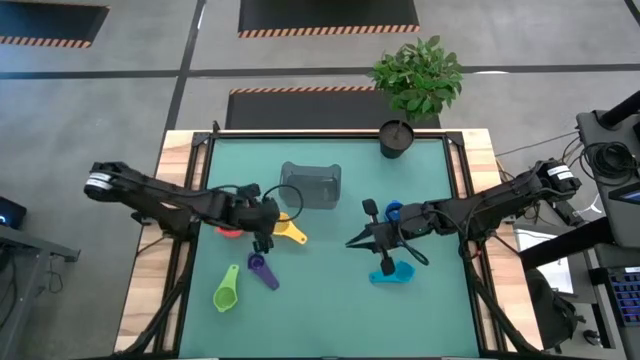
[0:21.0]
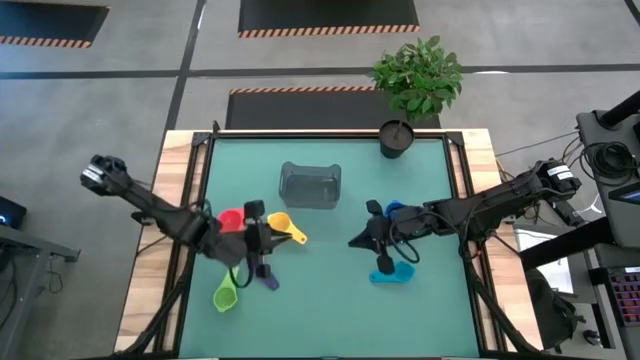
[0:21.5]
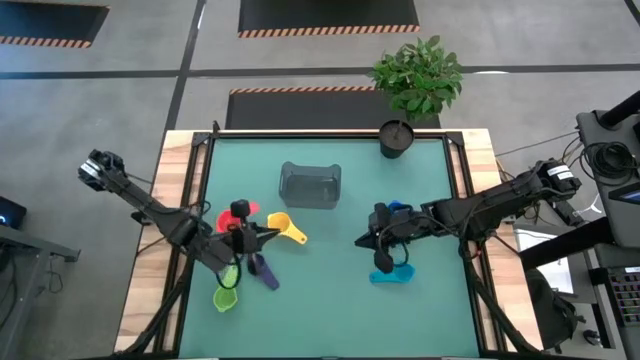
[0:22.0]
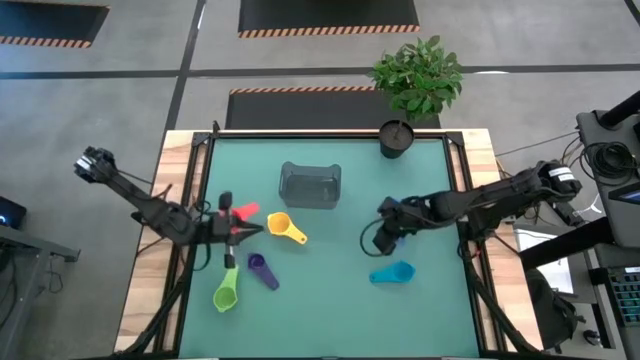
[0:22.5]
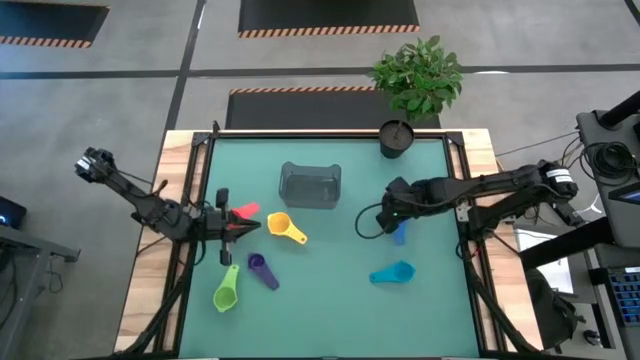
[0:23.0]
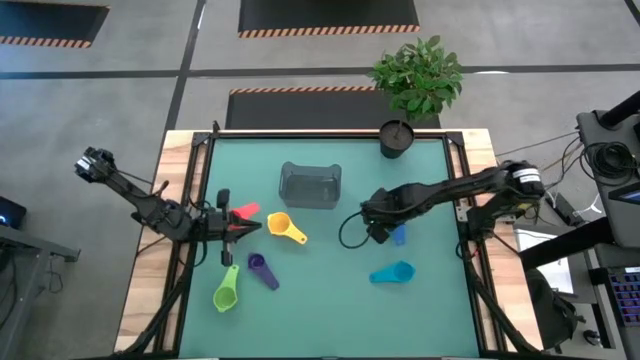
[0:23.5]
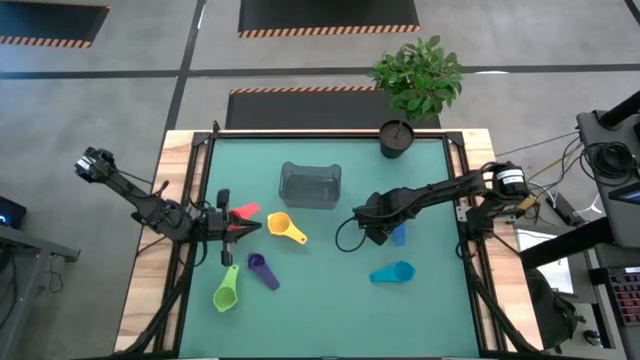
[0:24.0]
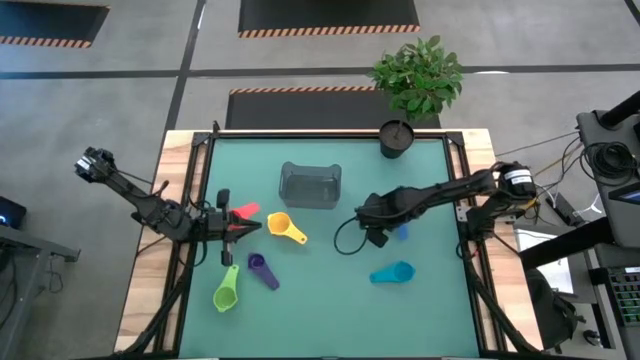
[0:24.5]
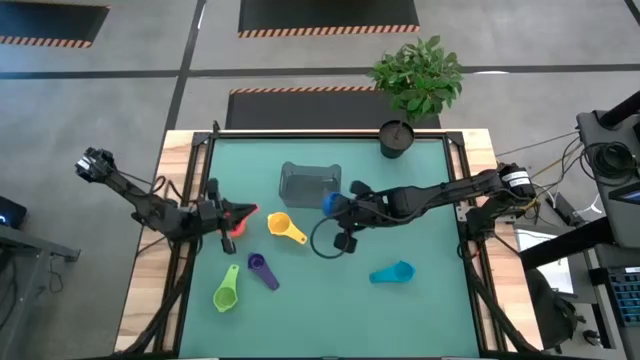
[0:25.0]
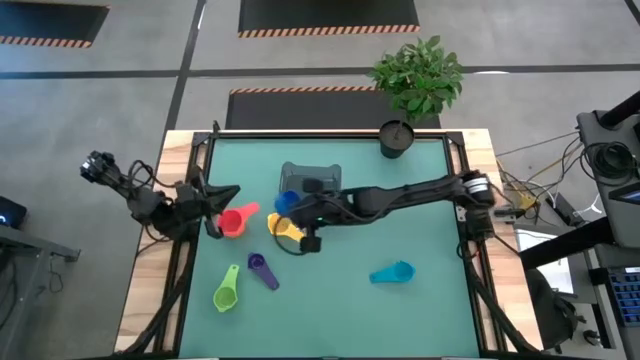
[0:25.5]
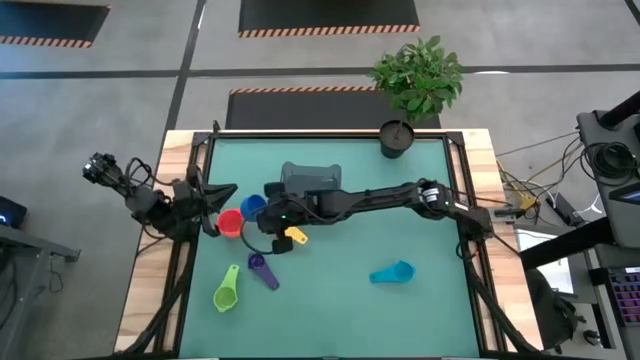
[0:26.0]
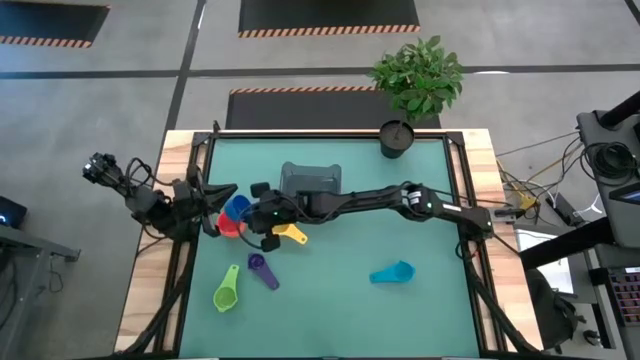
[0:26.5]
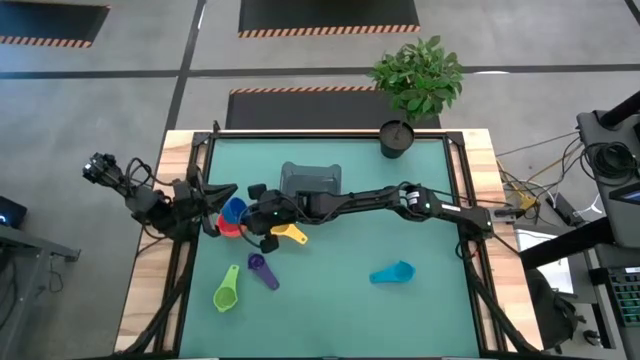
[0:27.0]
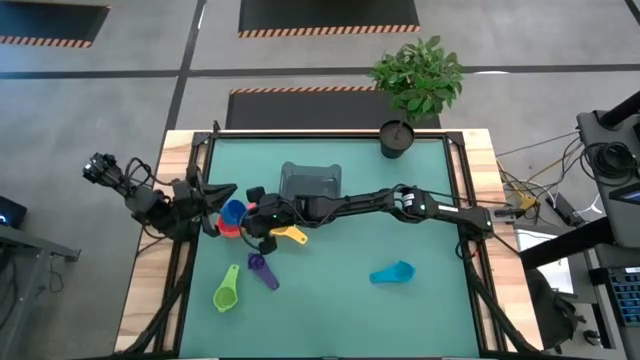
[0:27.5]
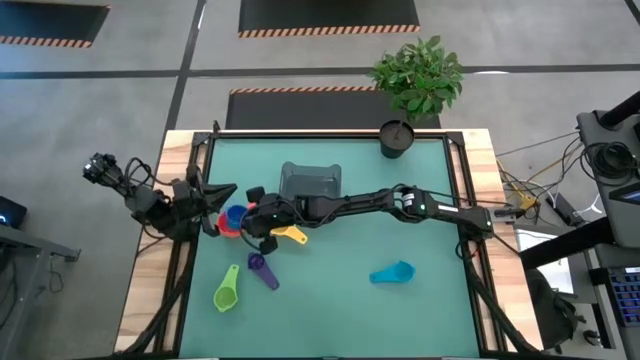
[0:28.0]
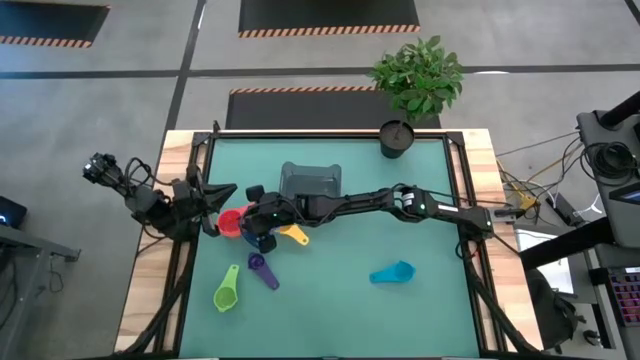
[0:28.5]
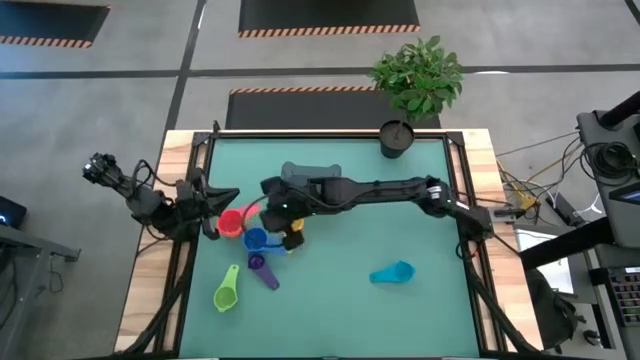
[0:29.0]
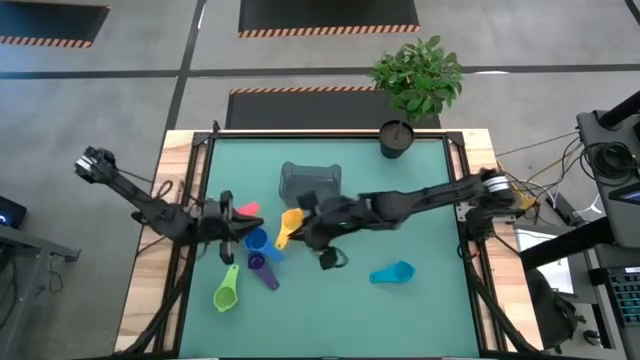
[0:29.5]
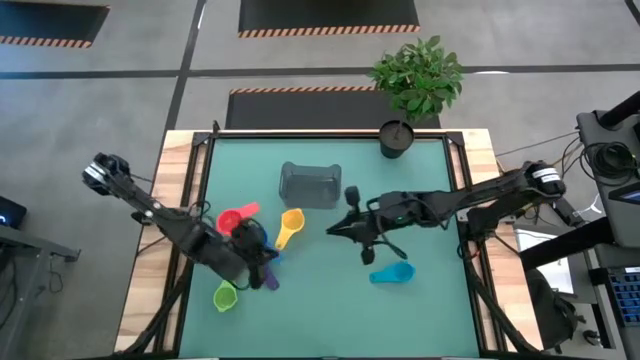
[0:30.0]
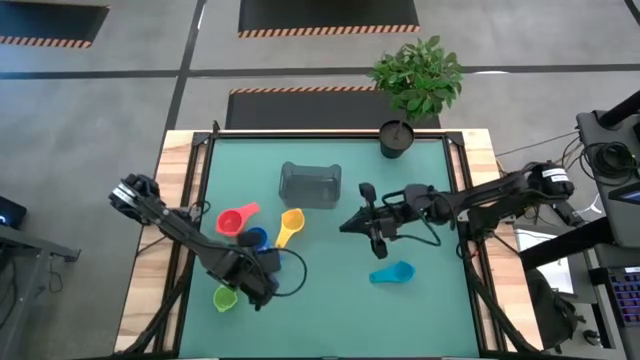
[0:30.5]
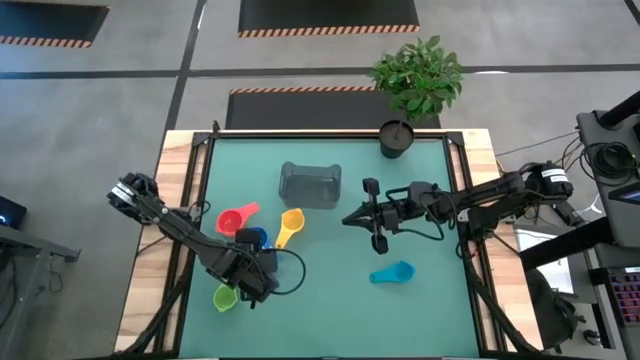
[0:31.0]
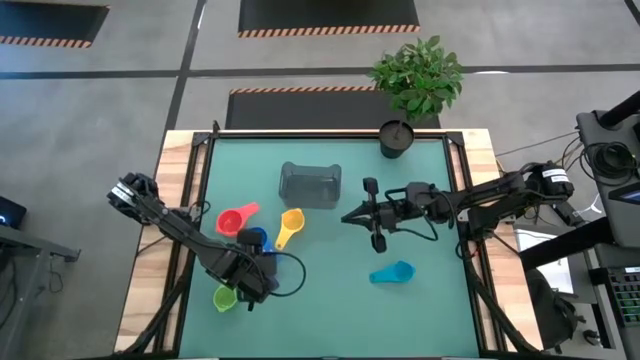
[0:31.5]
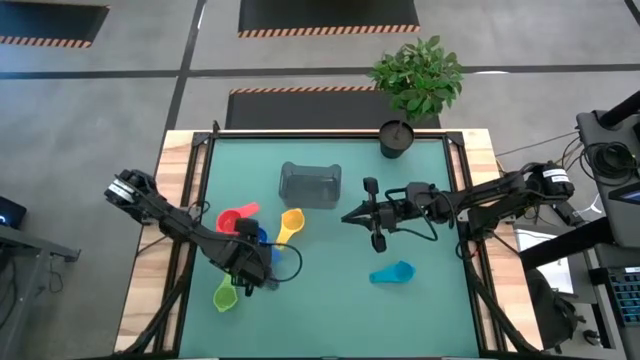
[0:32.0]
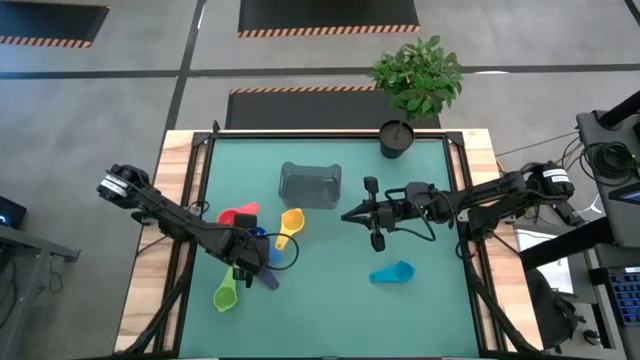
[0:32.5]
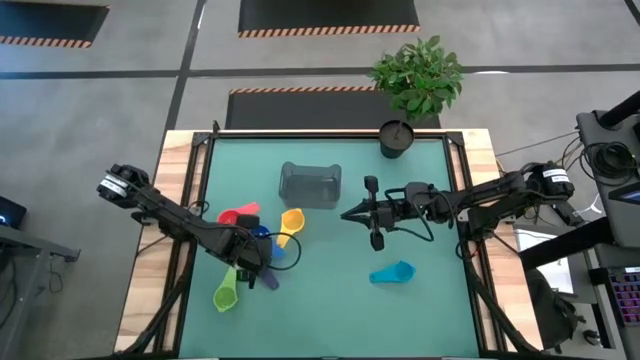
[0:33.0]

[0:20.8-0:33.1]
Task: Nest measuring cups in basket
Stack the blue measuring cup into the red measuring cup

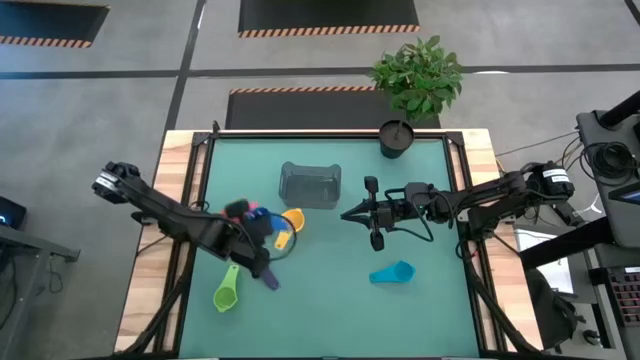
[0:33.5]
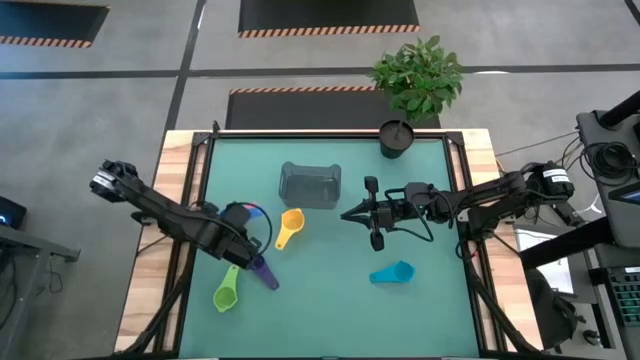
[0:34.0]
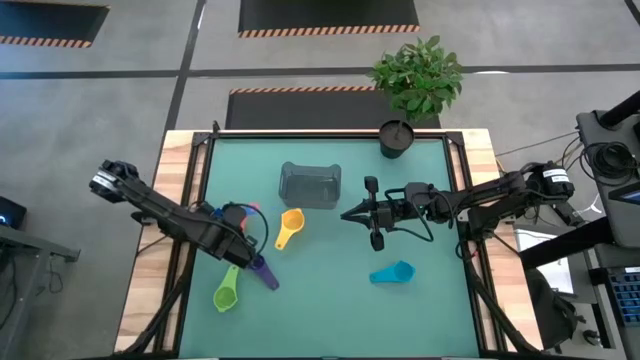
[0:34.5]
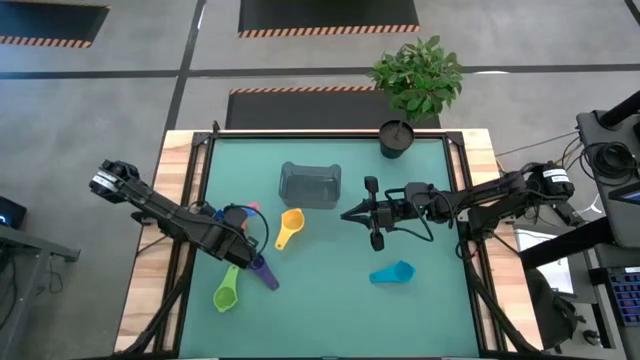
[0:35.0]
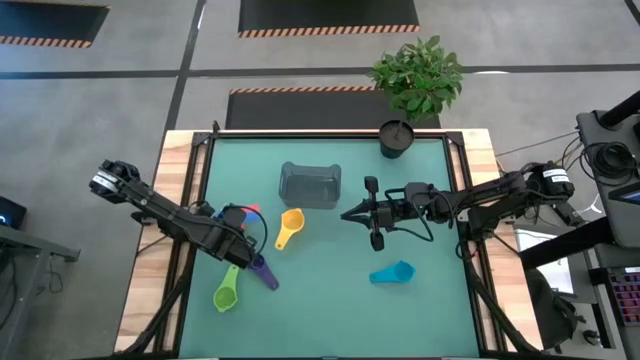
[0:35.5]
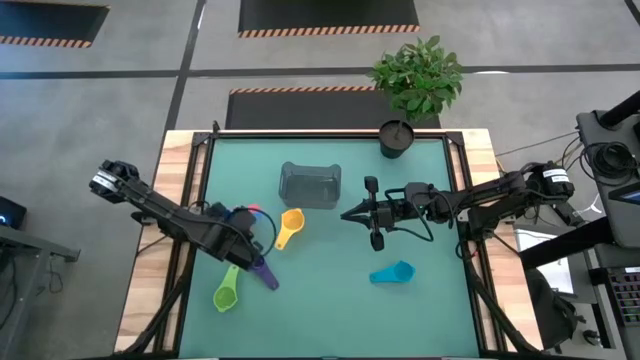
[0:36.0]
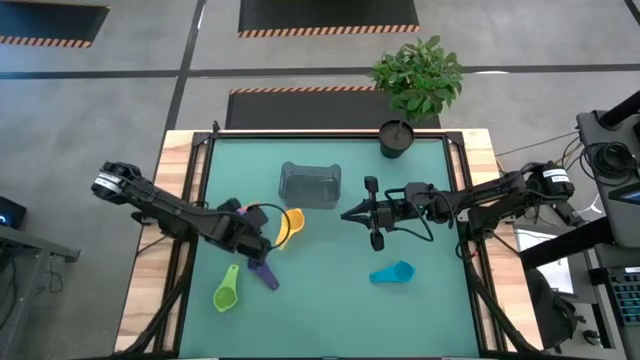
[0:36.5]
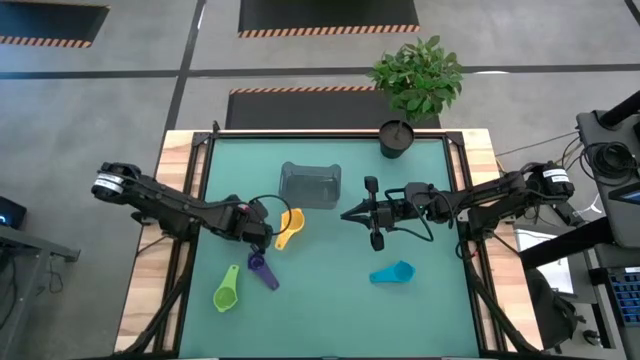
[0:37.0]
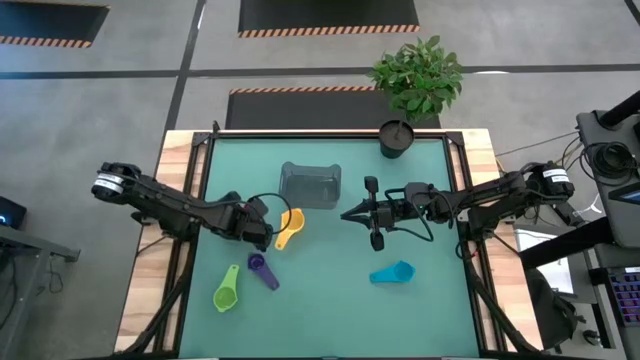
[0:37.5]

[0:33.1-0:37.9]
Stack the blue measuring cup into the red measuring cup
